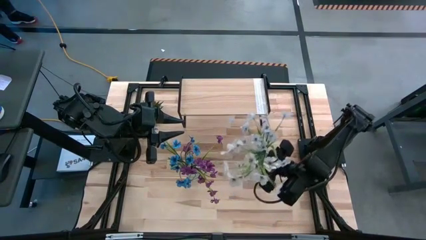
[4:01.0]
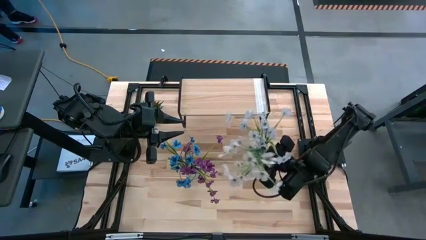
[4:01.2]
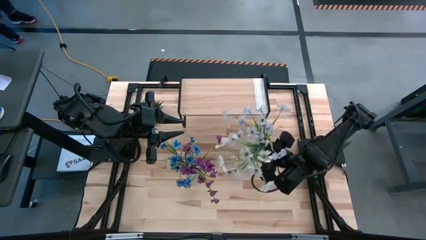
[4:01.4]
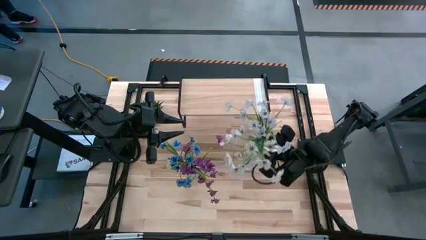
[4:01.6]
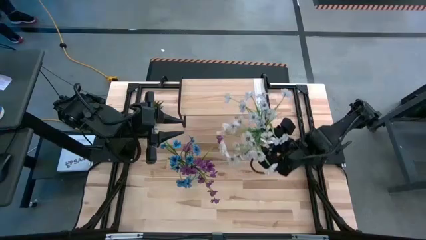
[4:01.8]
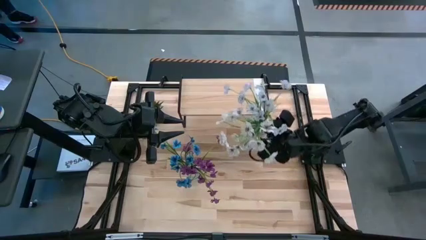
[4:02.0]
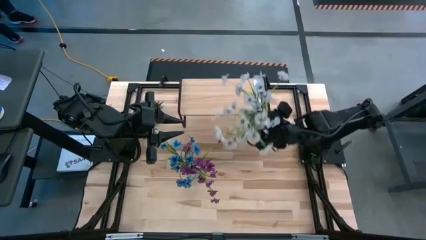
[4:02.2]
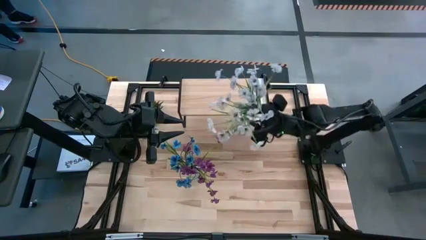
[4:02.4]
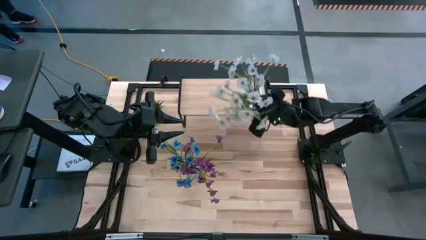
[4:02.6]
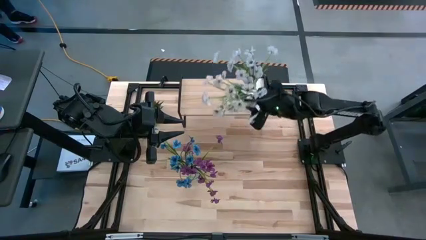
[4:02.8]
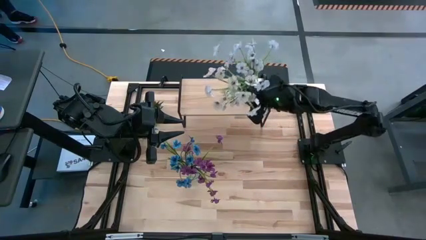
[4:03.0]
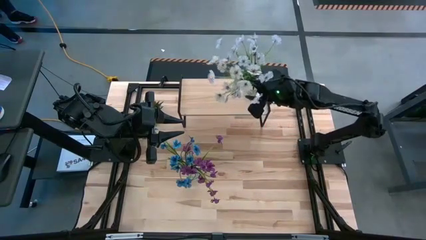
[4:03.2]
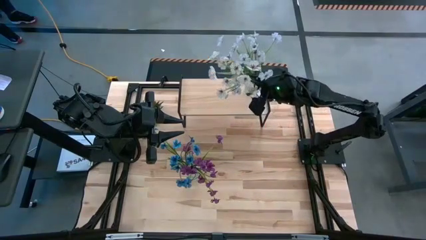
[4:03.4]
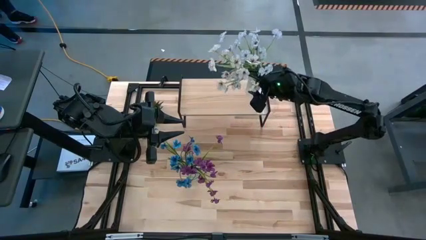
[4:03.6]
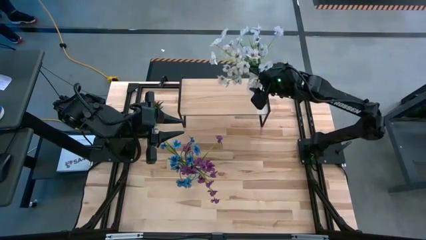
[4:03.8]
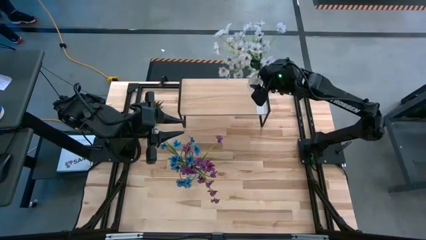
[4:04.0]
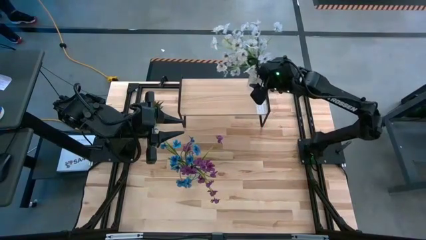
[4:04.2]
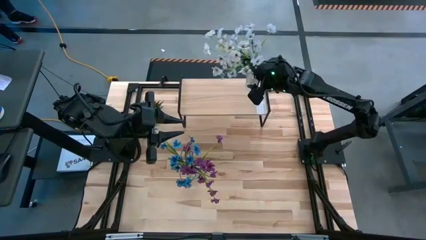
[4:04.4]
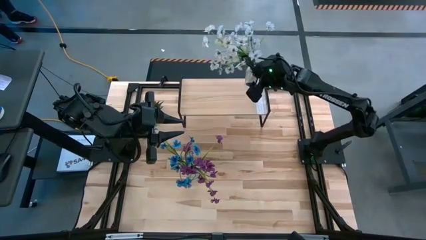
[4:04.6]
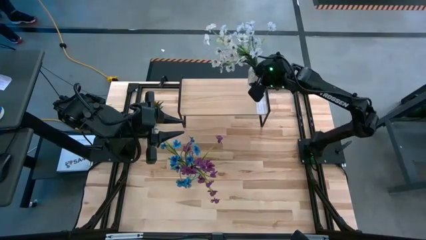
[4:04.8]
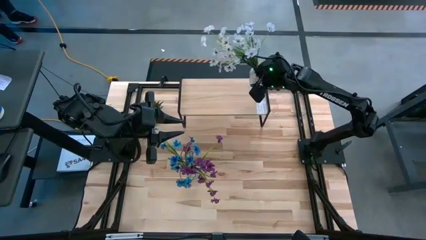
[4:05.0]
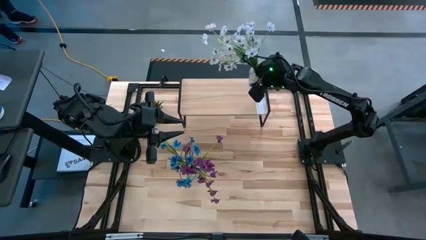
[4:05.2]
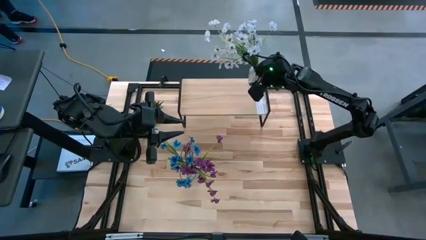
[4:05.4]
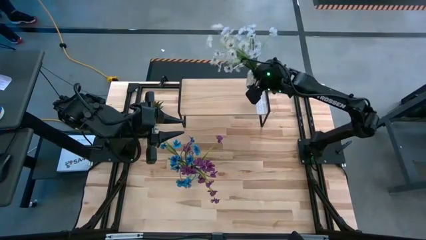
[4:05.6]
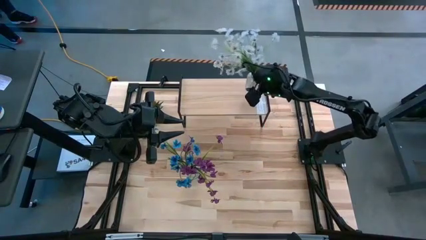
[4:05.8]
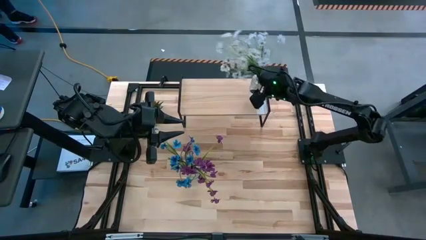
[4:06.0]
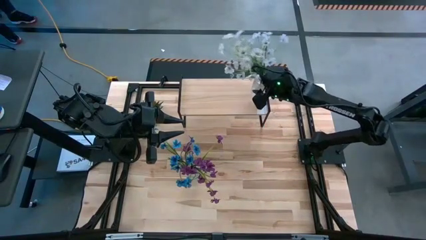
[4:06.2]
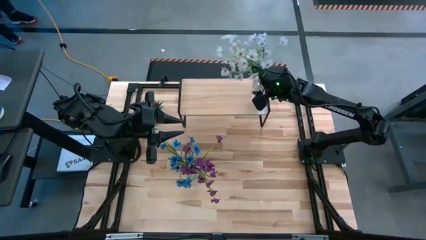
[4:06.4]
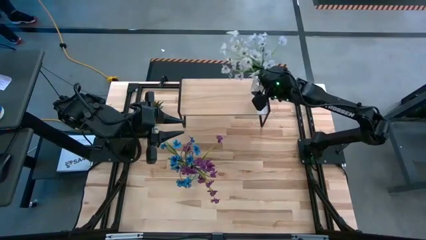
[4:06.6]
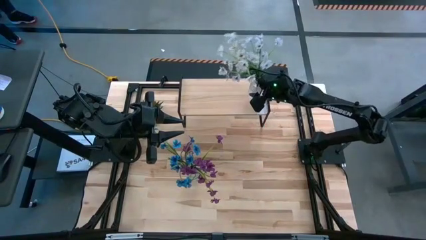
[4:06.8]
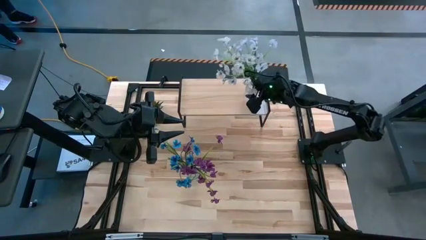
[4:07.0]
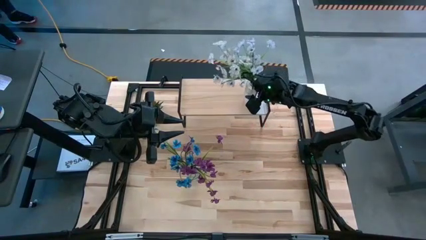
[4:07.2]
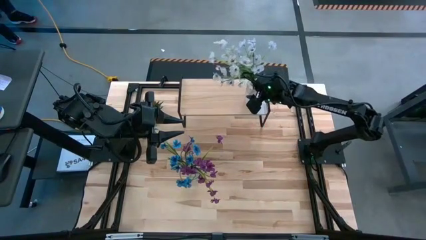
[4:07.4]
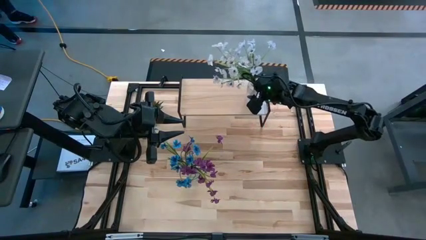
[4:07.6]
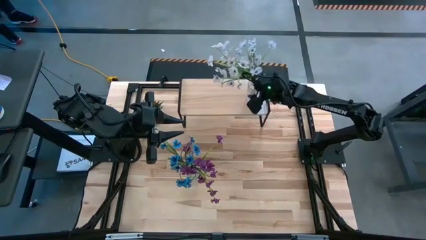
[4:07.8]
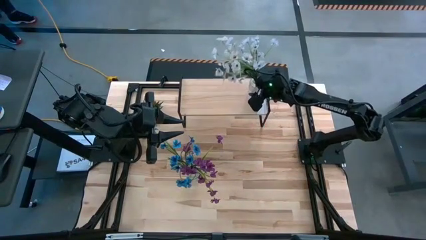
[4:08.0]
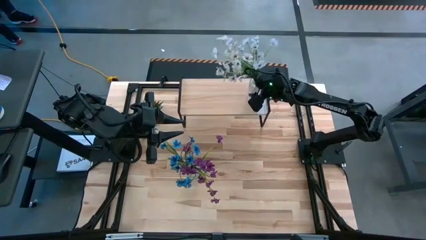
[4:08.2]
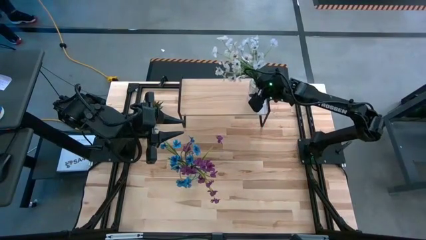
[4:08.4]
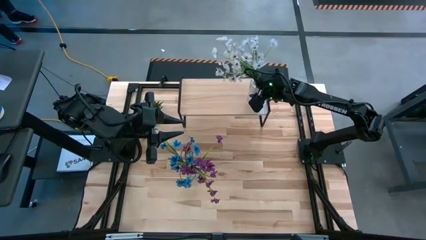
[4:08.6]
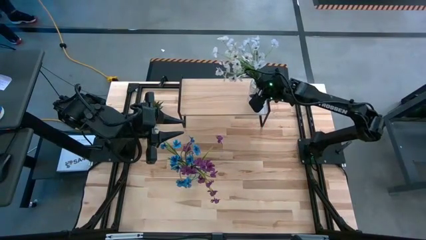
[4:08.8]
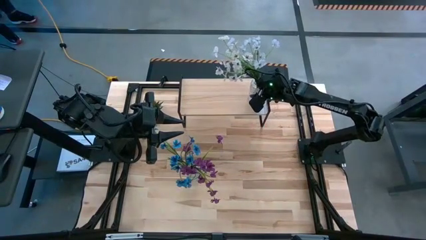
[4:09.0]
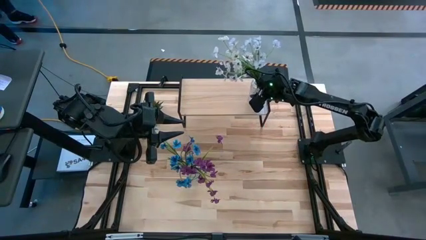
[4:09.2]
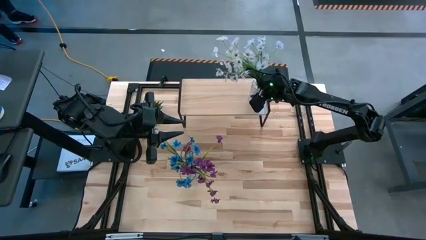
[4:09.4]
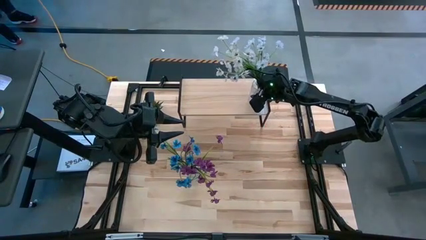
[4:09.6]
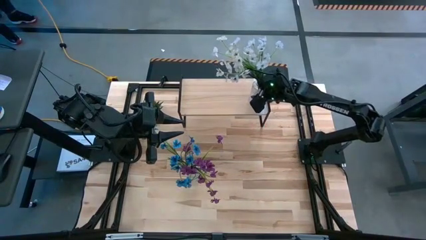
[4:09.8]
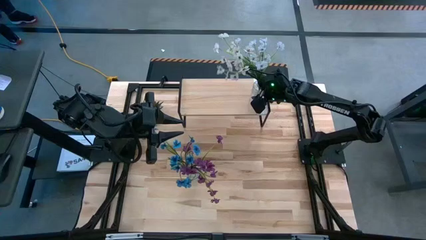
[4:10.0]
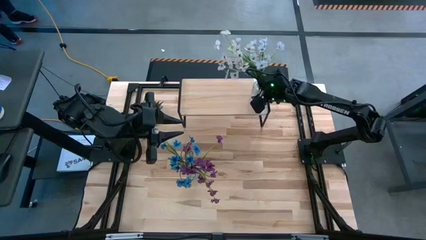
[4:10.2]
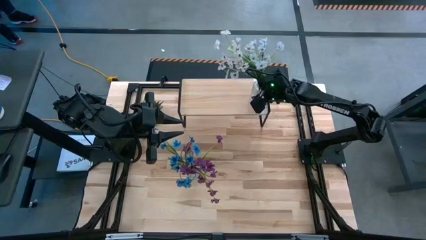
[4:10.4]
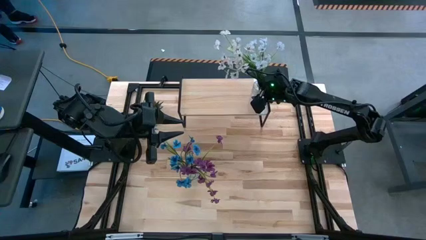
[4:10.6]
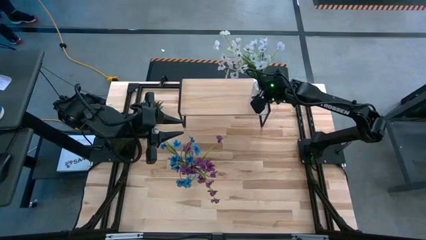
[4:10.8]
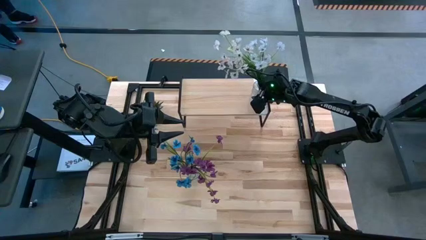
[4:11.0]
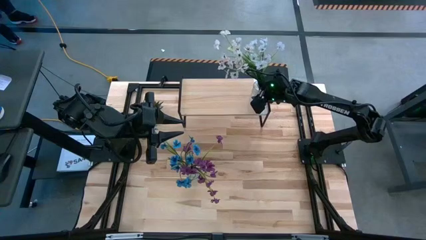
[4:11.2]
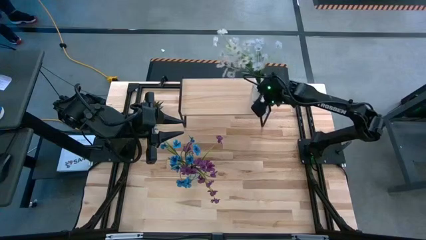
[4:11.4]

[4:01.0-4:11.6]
Task: Pick and place flowers into a vace then onto a shelf
Put the right transparent vase with flowers on the shelf

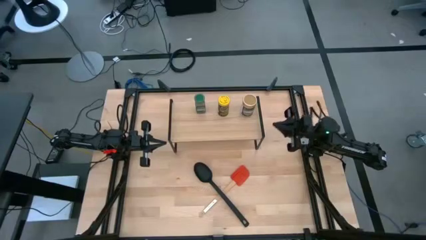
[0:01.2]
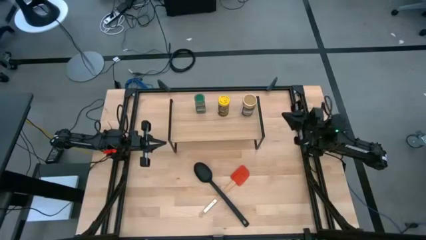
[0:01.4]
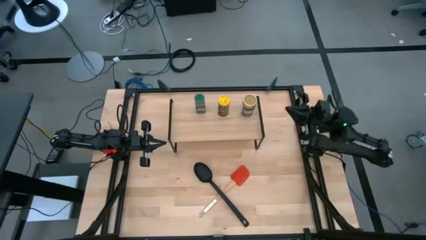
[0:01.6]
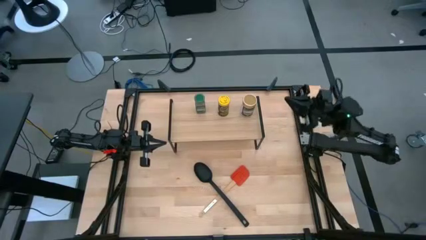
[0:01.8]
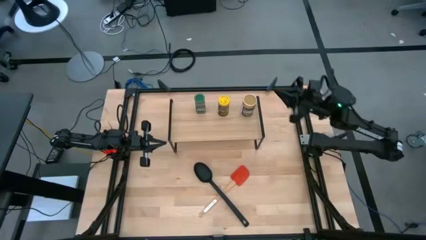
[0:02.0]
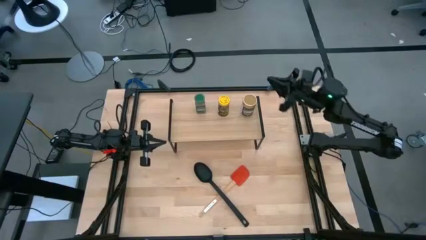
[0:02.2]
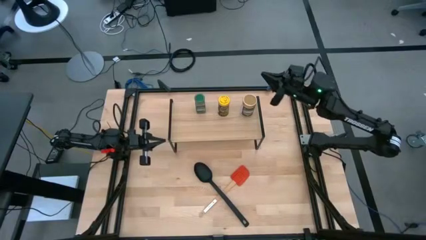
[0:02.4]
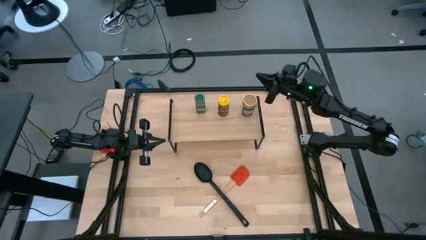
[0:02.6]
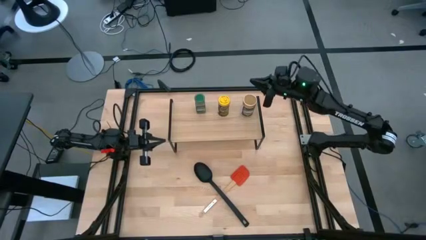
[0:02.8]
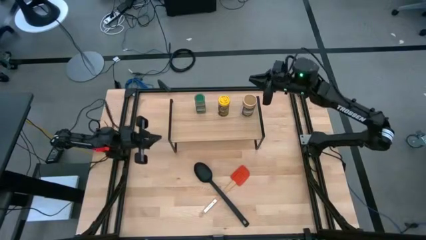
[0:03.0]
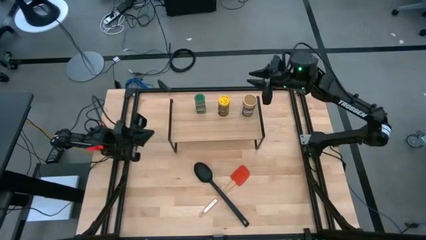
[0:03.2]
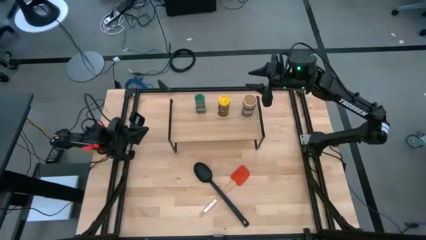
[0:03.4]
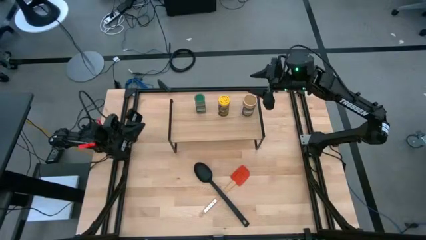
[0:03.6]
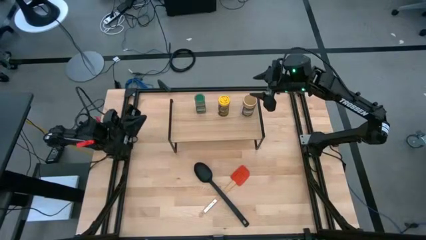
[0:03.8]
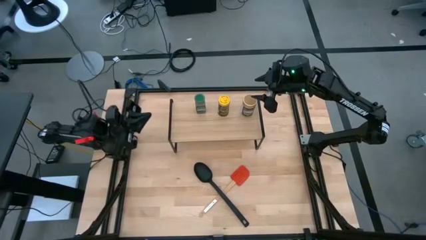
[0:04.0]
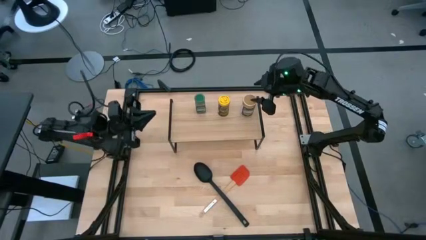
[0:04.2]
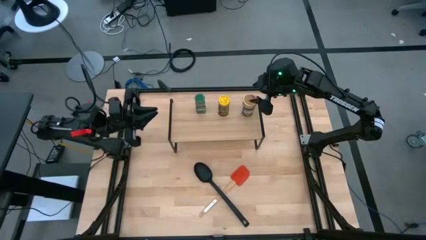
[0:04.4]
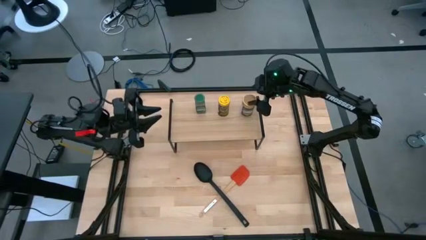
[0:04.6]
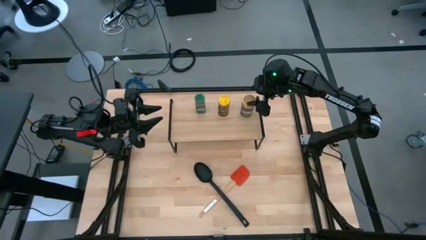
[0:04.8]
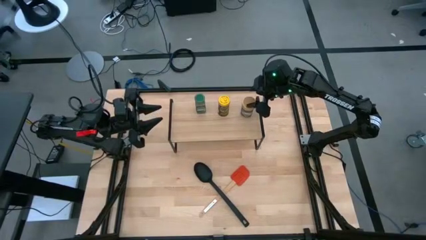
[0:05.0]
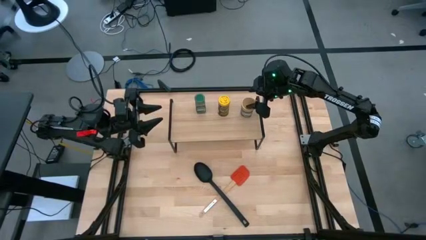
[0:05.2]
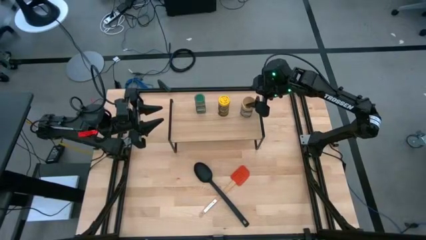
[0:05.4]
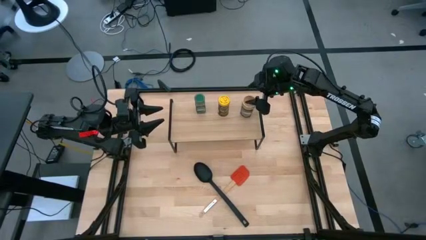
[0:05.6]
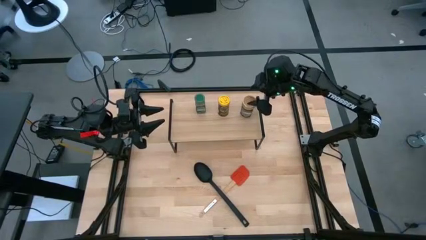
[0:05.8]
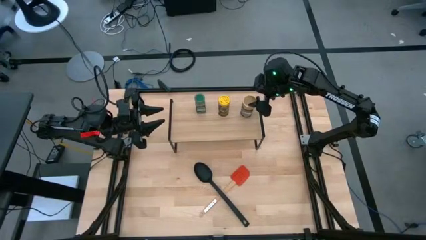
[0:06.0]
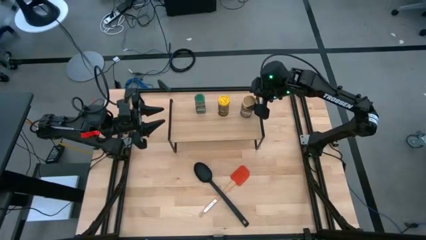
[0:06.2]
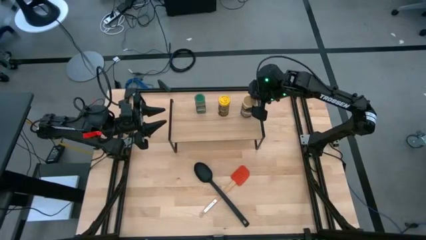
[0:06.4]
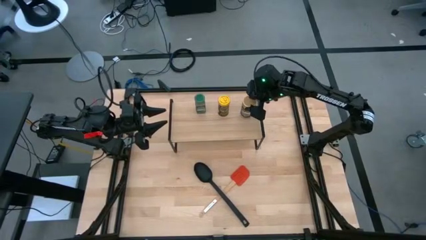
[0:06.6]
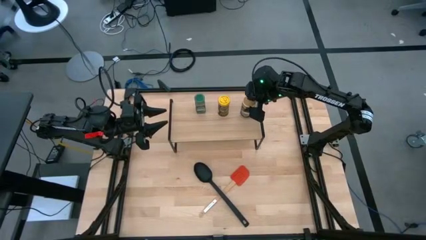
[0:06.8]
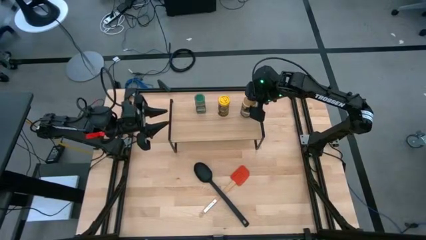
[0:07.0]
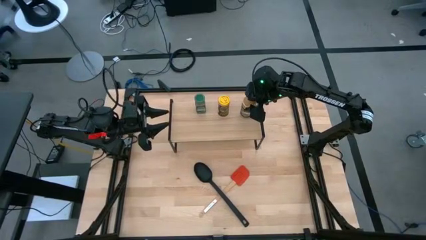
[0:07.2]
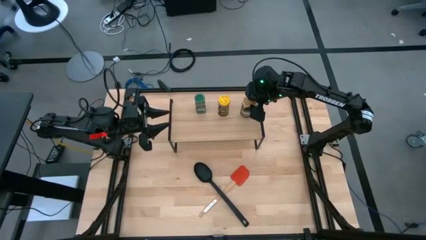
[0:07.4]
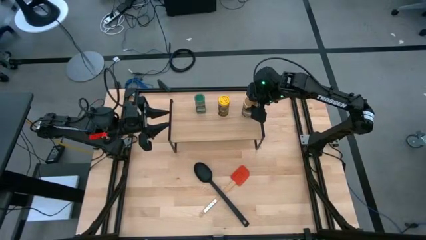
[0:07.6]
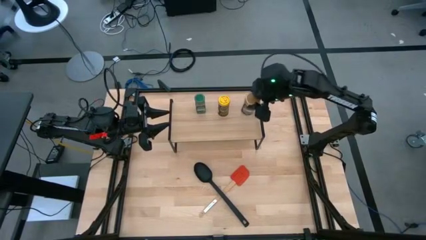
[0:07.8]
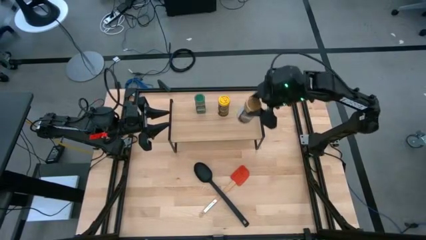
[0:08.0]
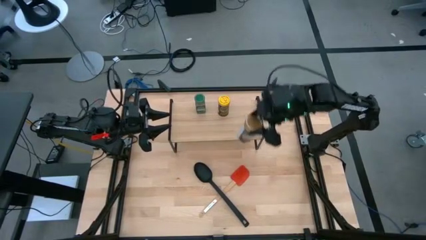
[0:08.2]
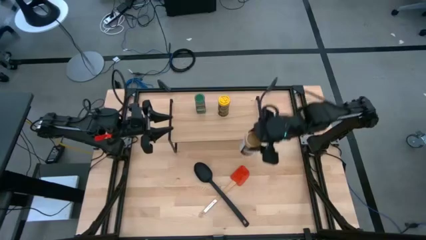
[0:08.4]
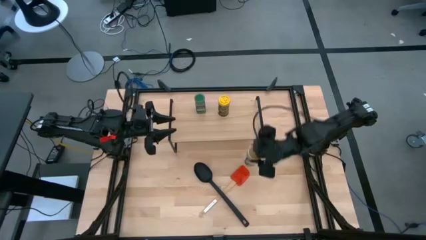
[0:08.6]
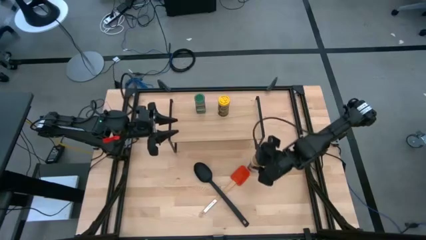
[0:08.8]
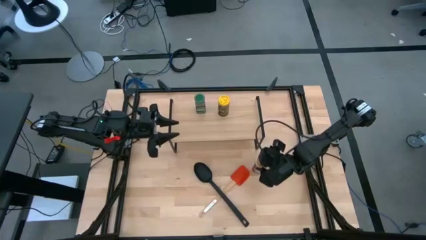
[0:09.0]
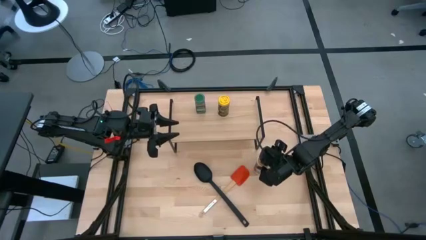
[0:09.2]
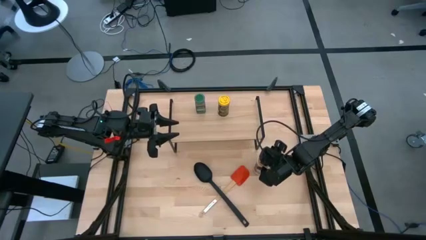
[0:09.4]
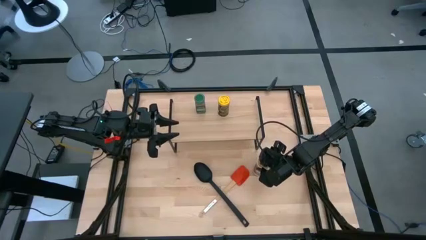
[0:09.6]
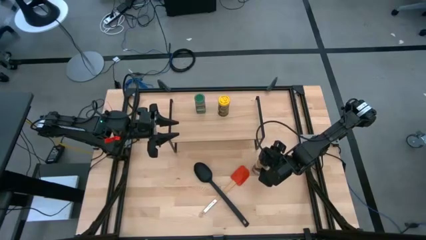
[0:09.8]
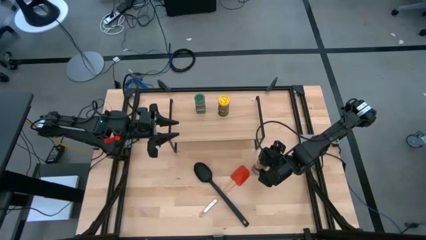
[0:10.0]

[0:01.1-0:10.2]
Task: Shelf spices
Remove the brown seasoning bottle from the shelf
